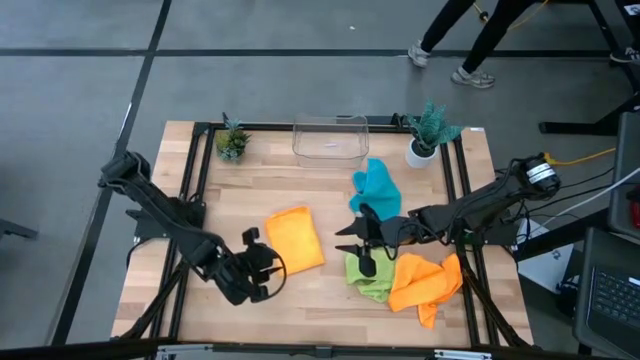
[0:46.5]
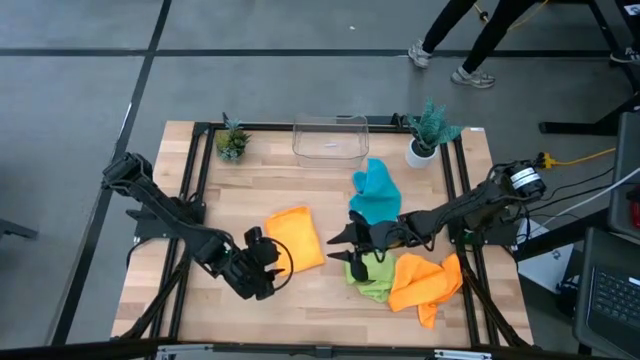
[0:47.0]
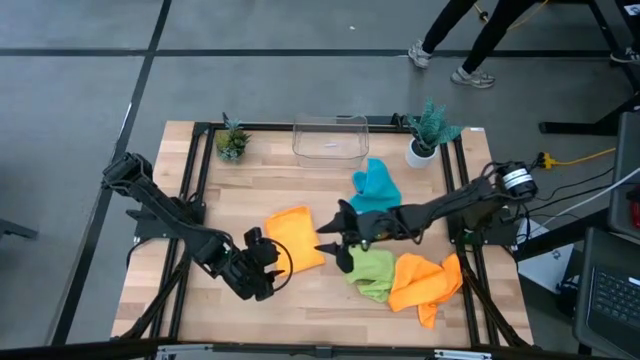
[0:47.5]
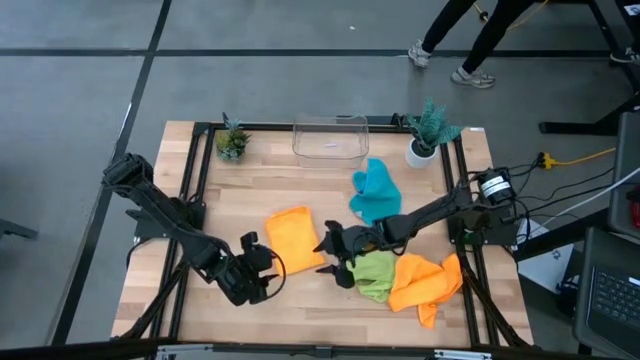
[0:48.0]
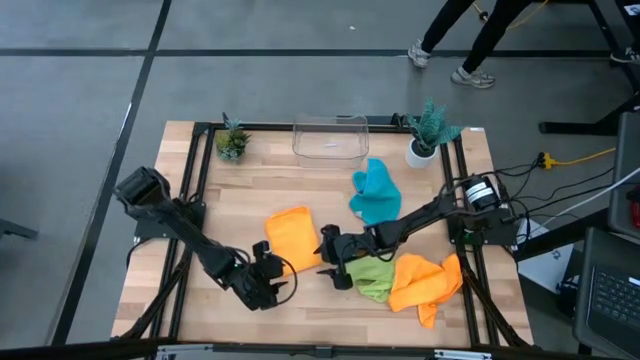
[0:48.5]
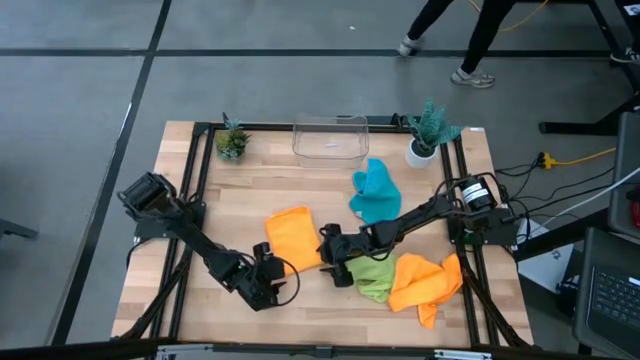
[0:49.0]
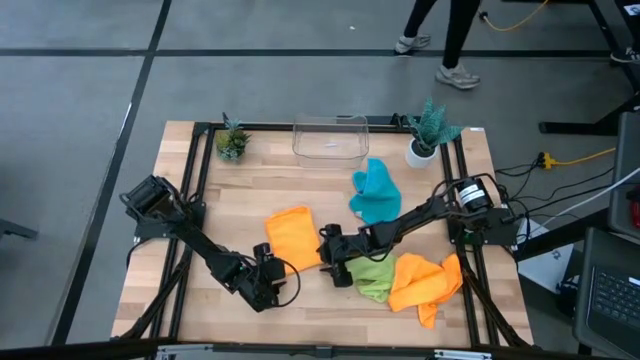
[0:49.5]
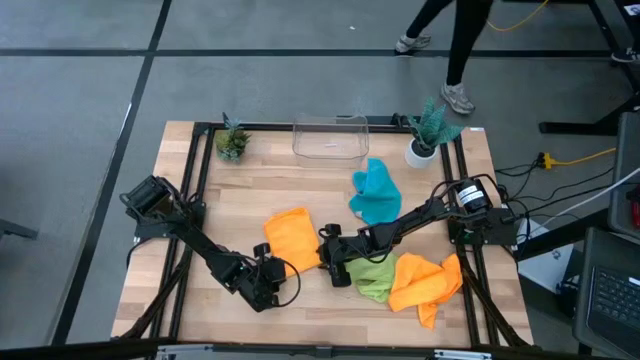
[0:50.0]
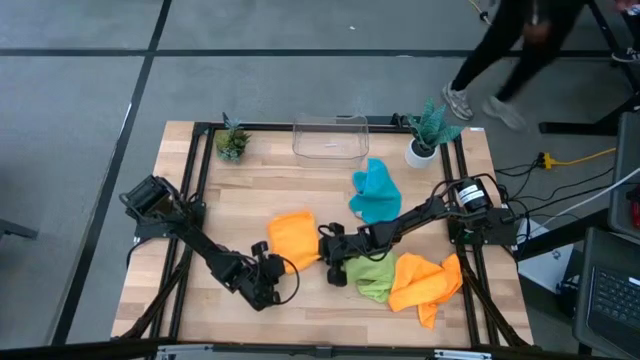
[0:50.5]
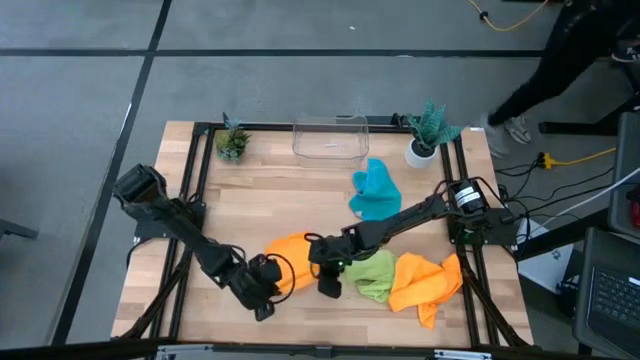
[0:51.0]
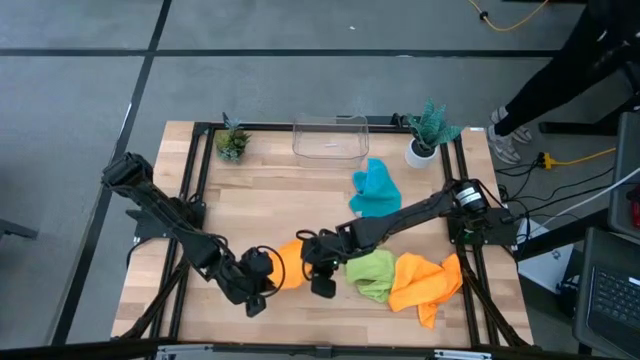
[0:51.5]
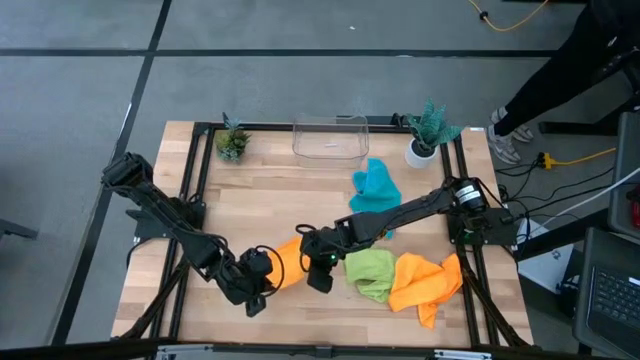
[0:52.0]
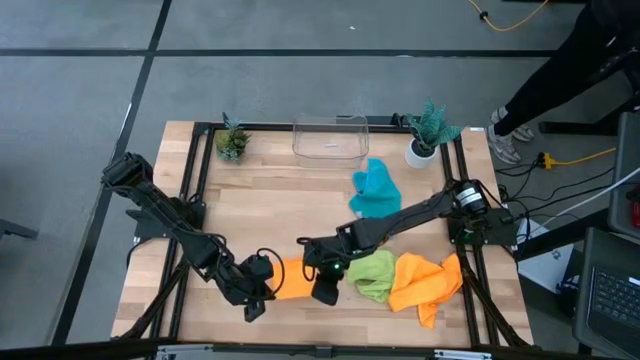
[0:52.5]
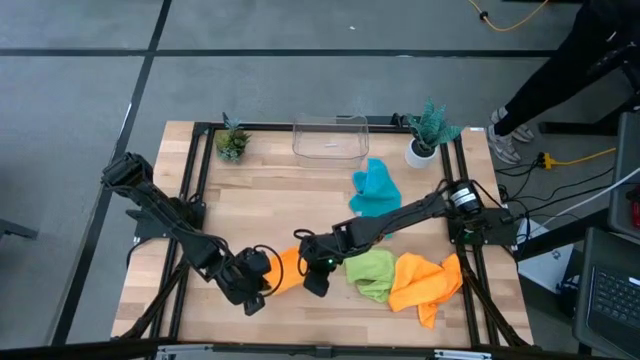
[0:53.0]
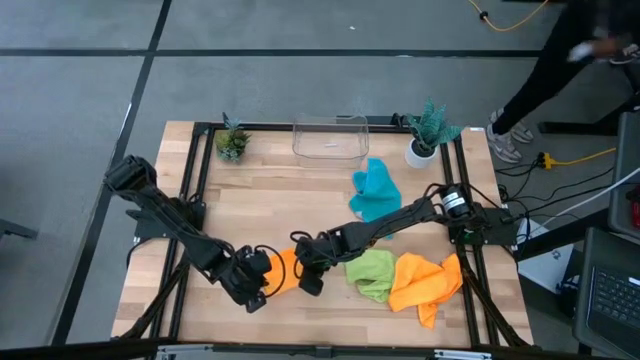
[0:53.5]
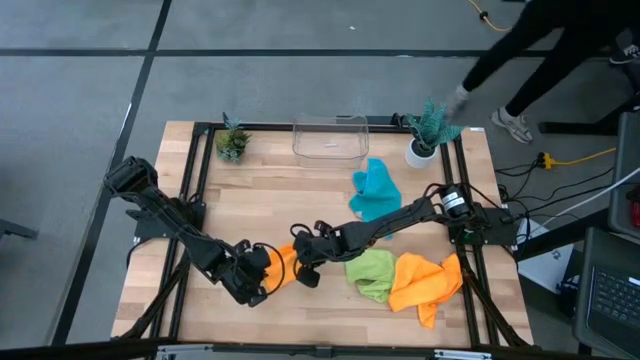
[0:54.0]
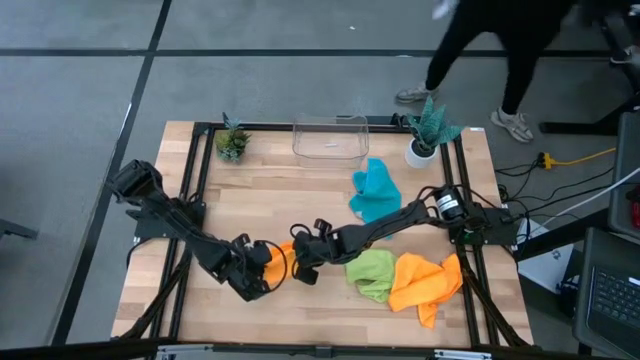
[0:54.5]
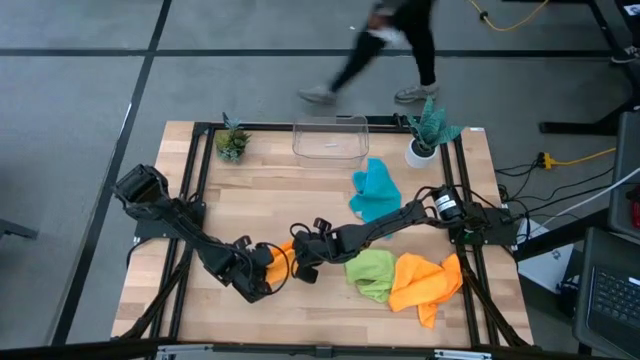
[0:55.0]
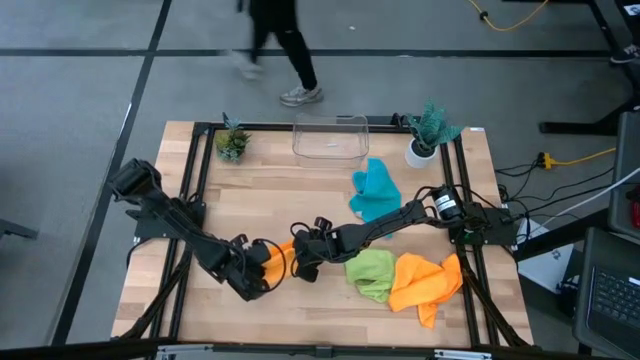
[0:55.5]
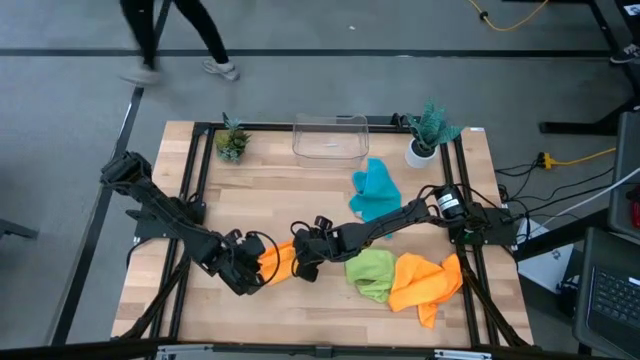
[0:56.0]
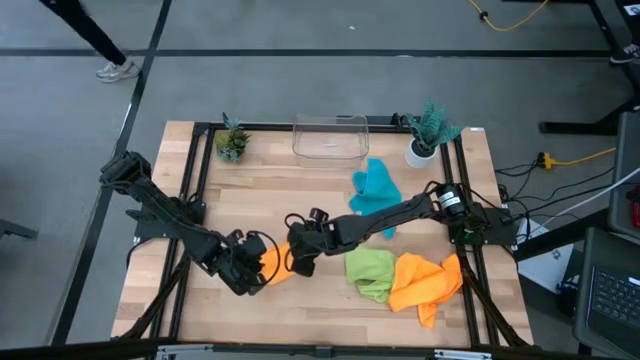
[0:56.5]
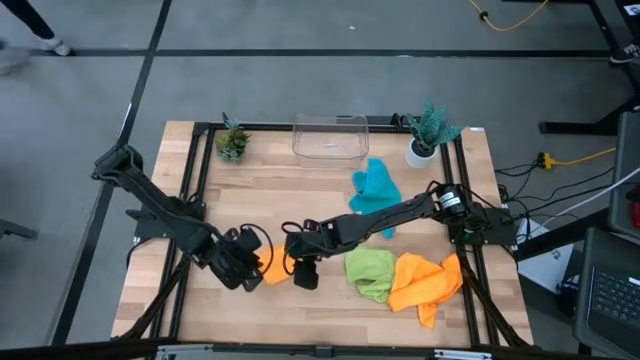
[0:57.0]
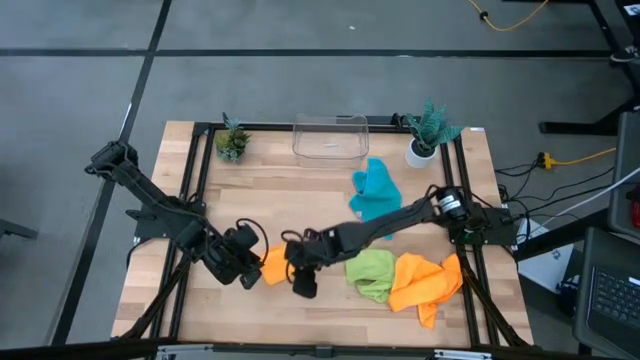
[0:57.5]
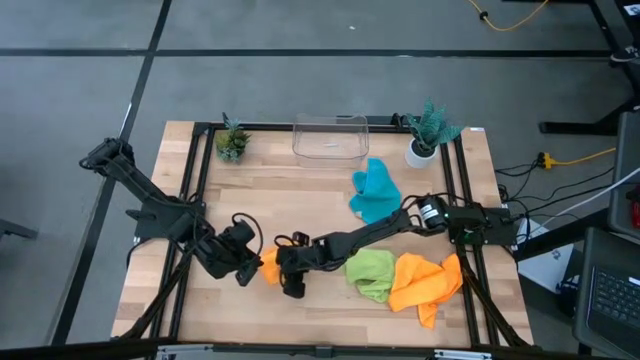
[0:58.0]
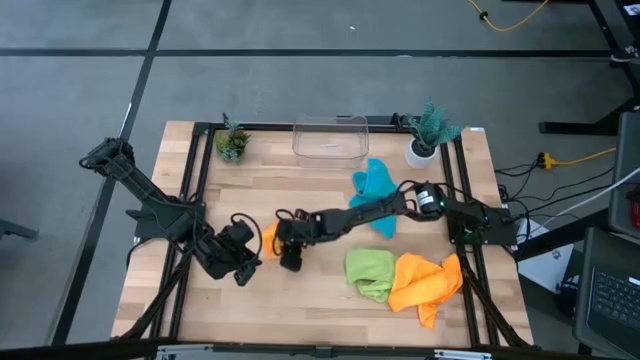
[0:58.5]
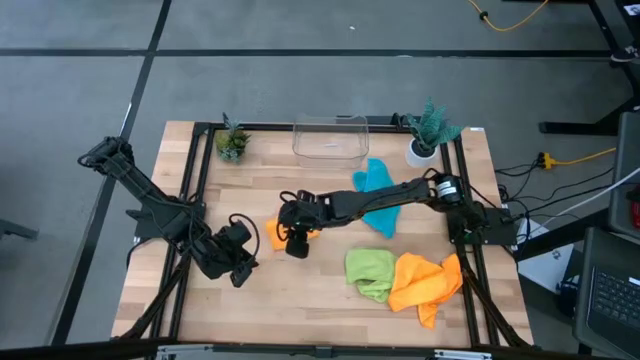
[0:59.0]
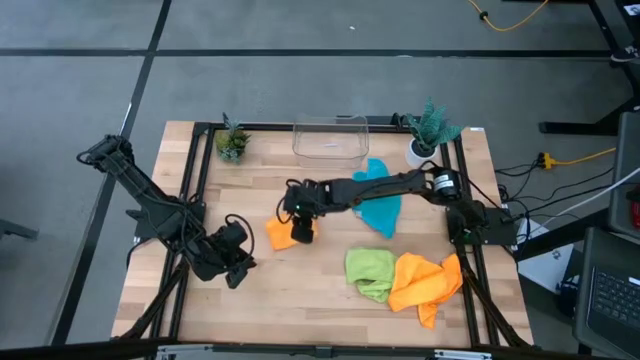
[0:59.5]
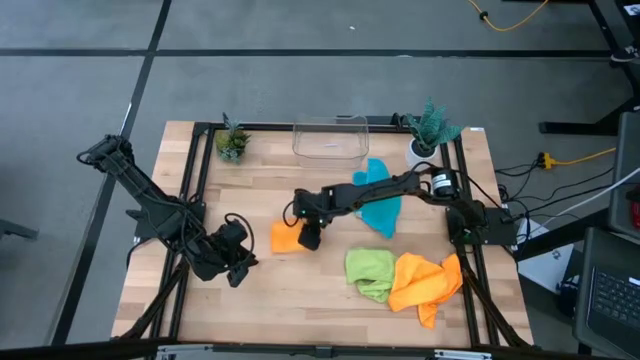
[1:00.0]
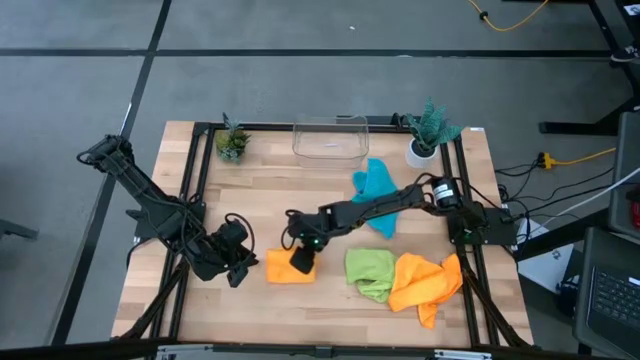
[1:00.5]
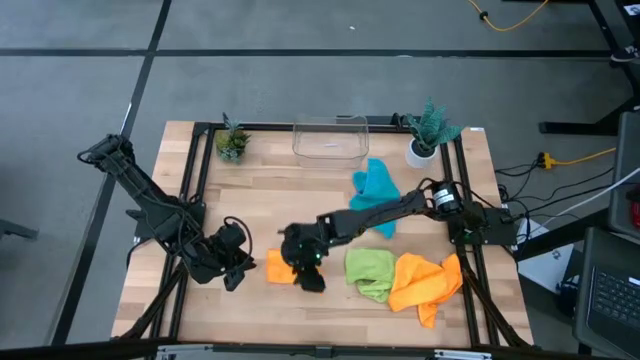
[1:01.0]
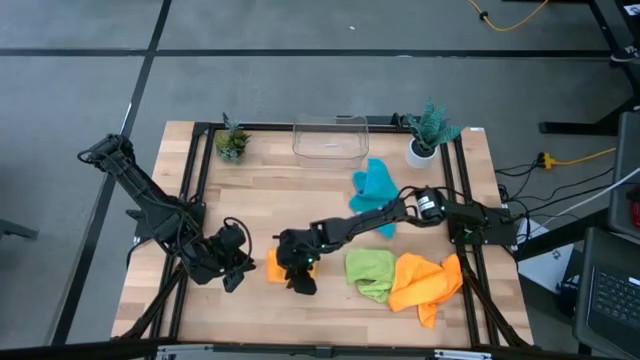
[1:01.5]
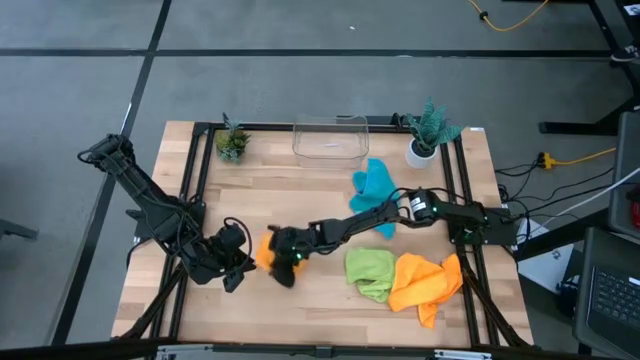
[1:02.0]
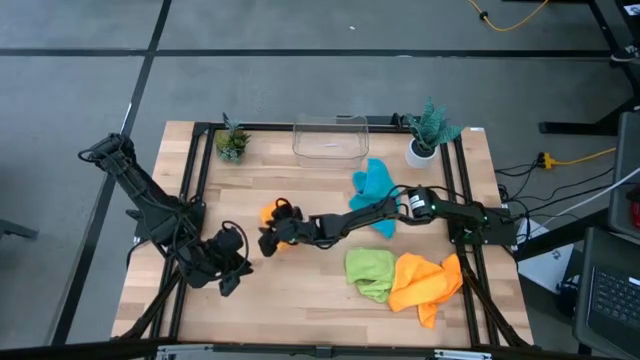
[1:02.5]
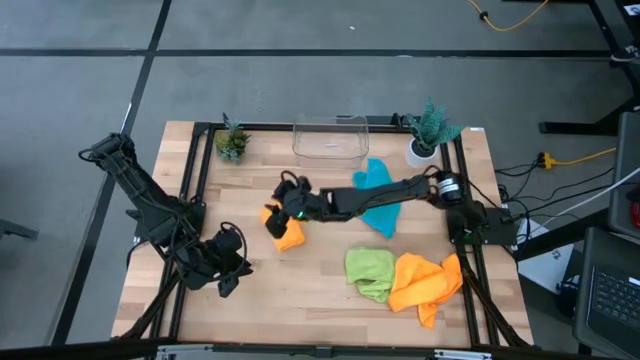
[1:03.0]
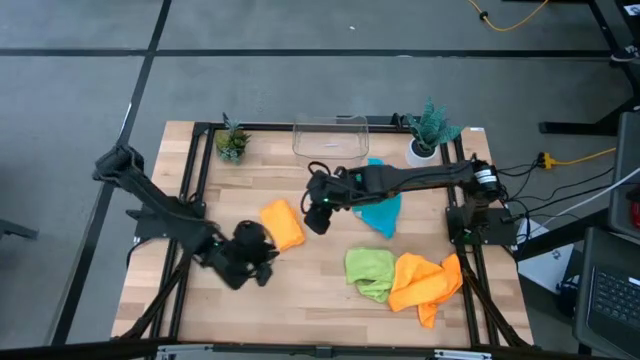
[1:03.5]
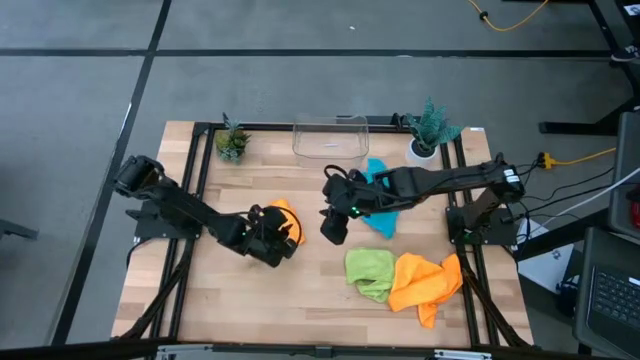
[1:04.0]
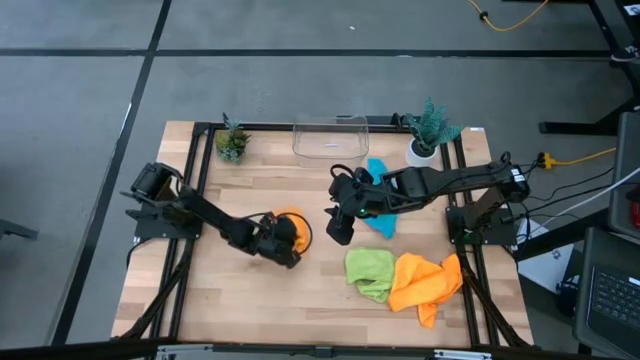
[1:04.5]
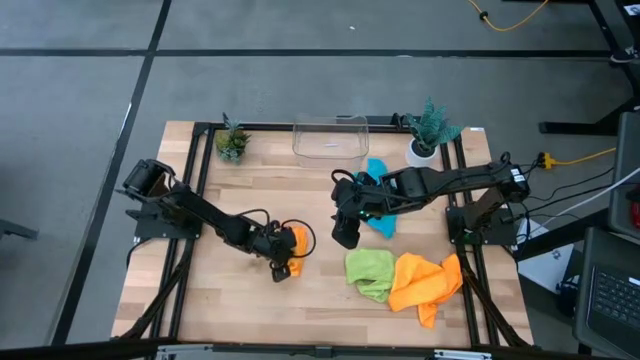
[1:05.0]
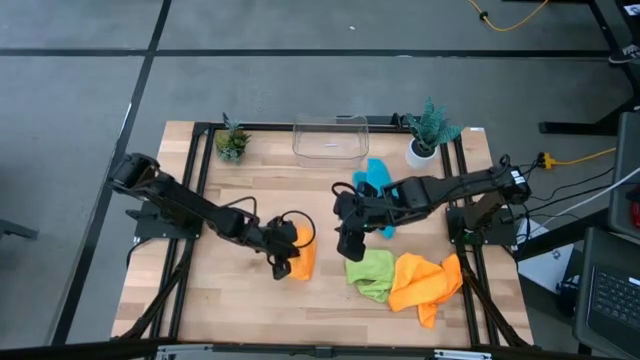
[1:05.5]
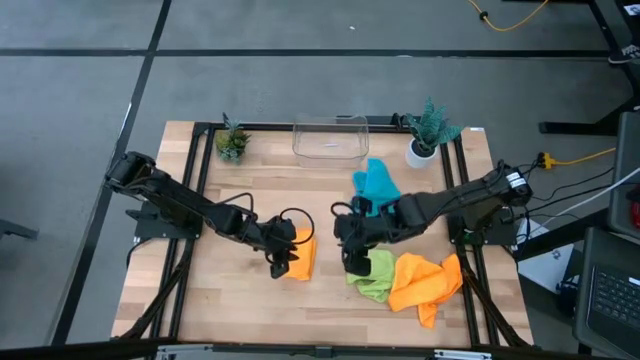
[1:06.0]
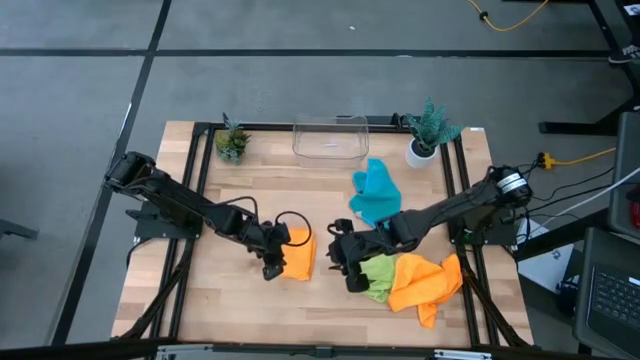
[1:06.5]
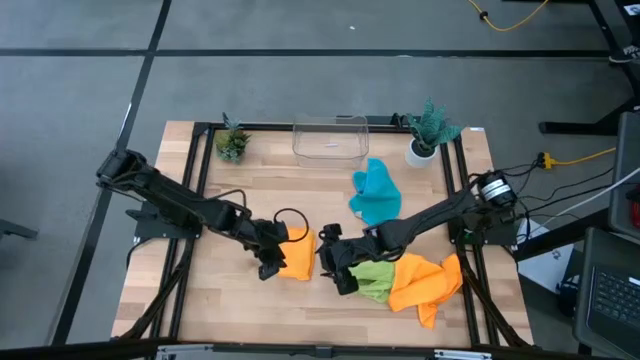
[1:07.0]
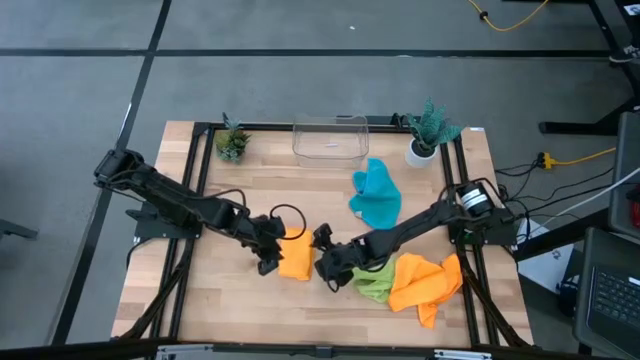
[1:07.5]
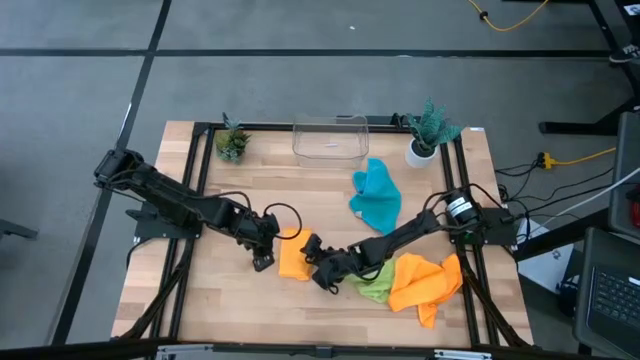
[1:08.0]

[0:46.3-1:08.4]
Task: Fold microfiber towels
Fold the orange towel
